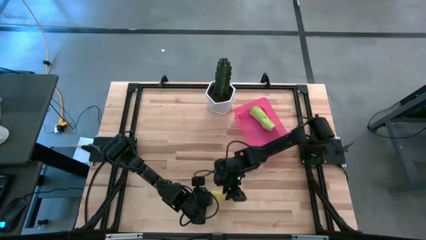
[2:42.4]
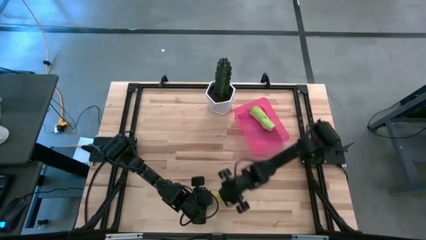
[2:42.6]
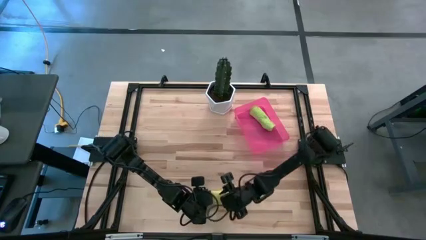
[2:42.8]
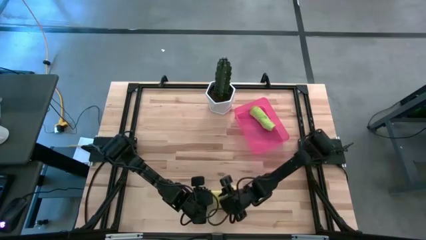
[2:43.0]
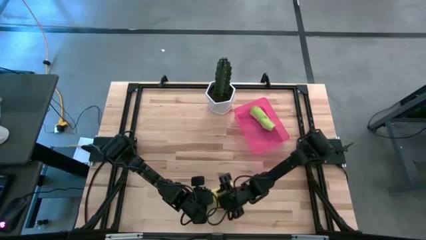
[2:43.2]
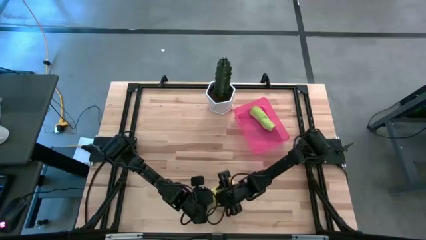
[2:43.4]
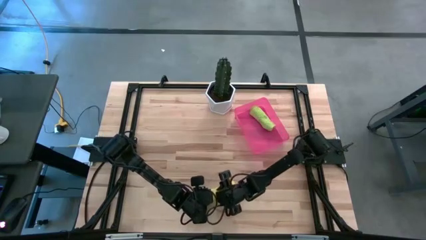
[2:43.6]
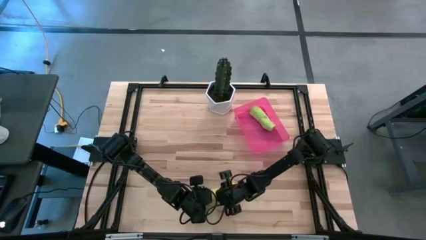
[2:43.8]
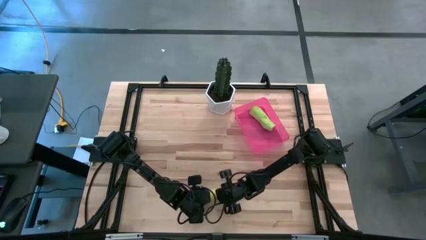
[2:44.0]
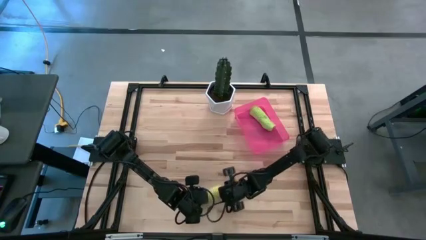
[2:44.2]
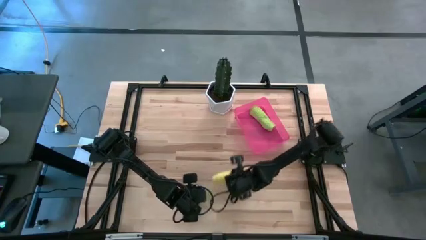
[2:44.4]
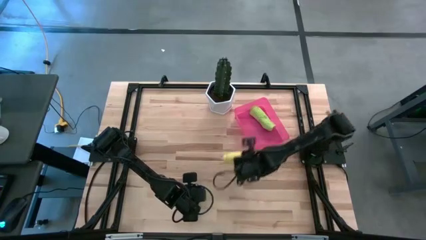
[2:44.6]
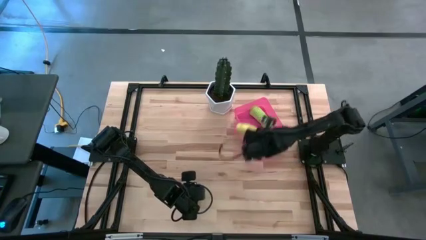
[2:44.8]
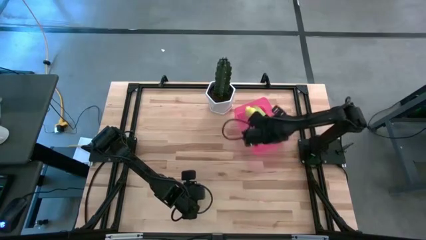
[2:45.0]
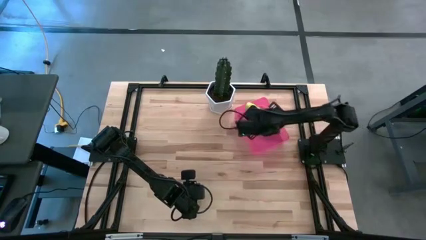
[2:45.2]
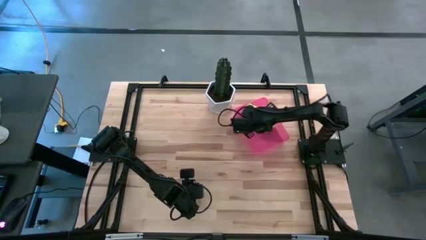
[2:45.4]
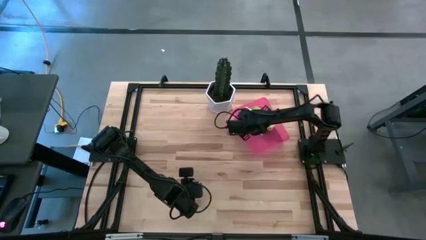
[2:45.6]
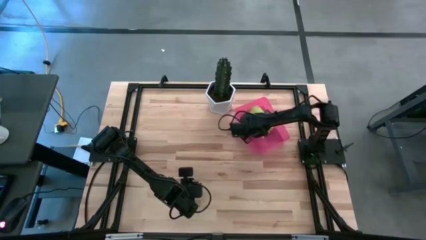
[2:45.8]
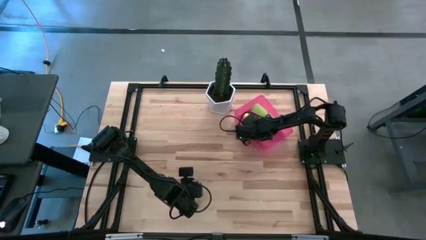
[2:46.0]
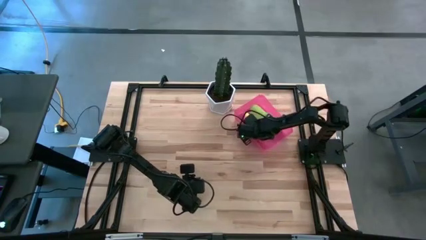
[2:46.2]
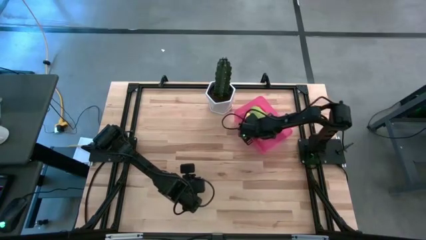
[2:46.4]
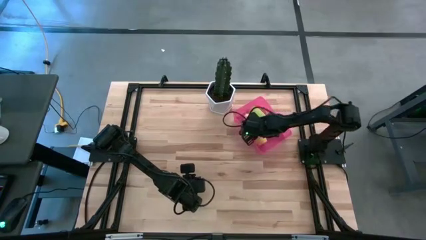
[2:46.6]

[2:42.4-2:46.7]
Task: Roll microfiber towels into tight, uniform cylinder then place into a basket
Put the rolled yellow towel into the pink bin

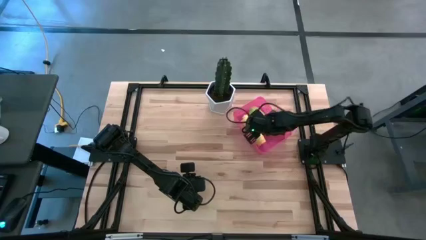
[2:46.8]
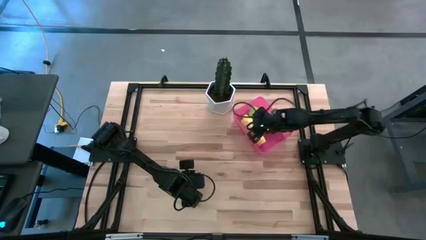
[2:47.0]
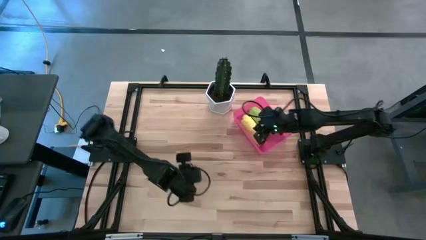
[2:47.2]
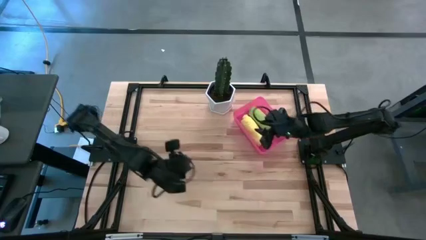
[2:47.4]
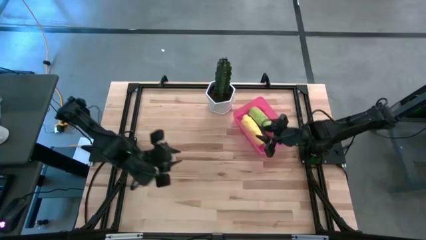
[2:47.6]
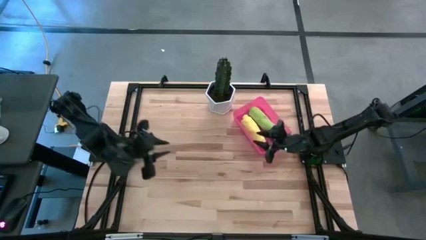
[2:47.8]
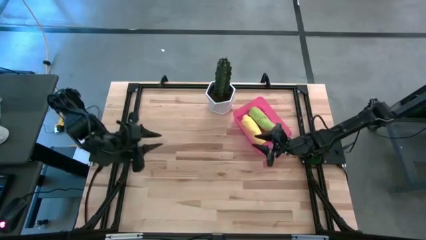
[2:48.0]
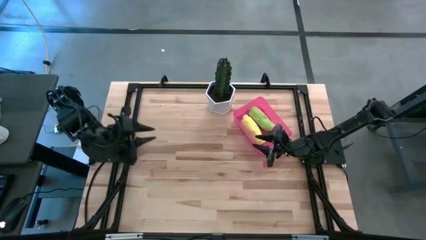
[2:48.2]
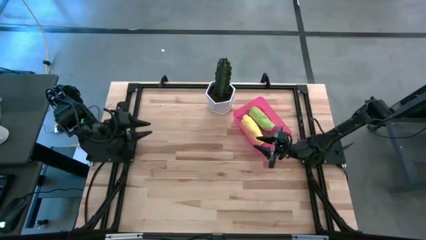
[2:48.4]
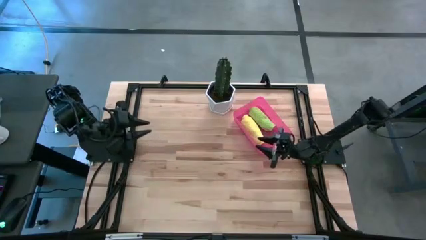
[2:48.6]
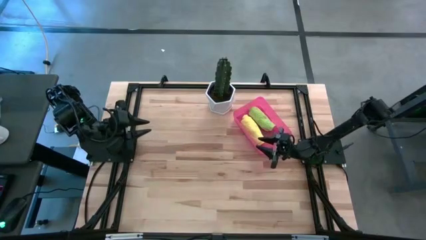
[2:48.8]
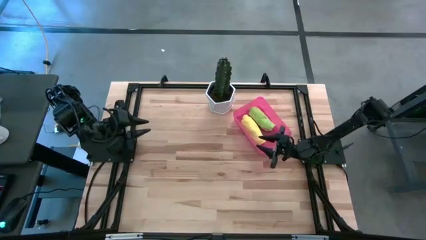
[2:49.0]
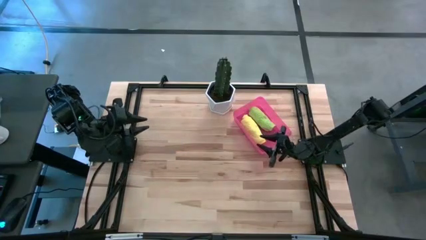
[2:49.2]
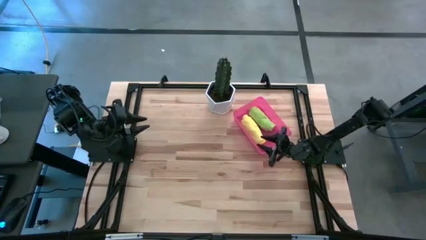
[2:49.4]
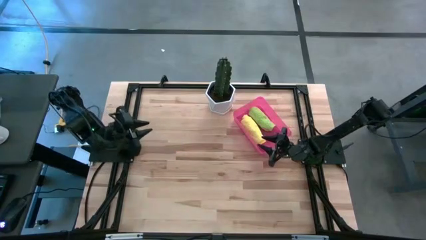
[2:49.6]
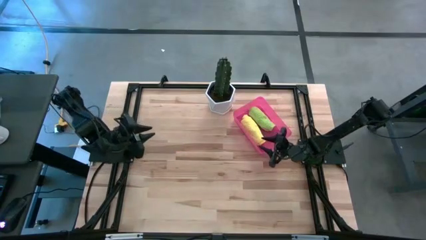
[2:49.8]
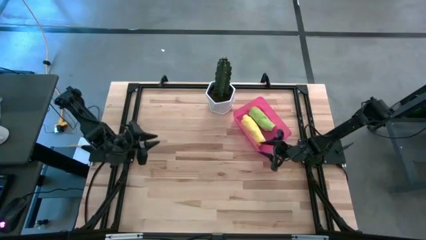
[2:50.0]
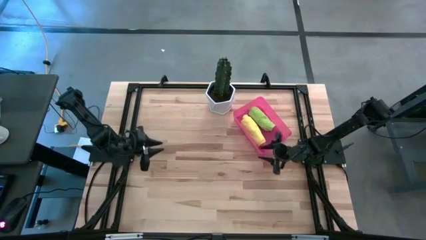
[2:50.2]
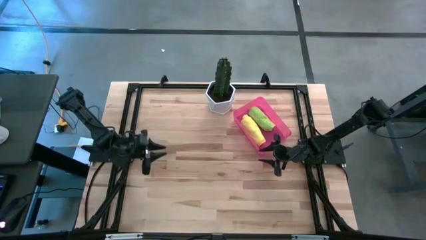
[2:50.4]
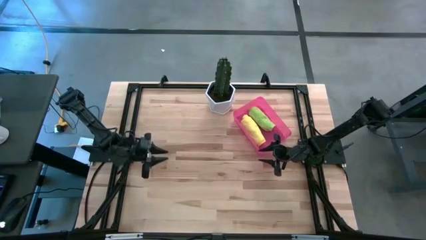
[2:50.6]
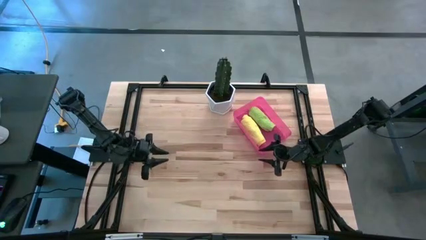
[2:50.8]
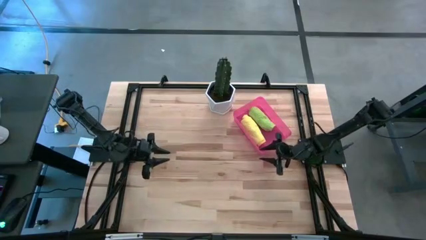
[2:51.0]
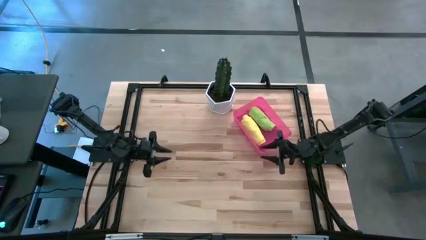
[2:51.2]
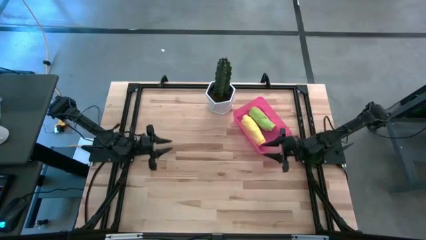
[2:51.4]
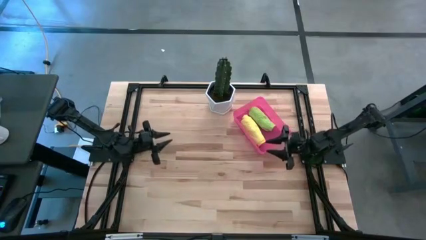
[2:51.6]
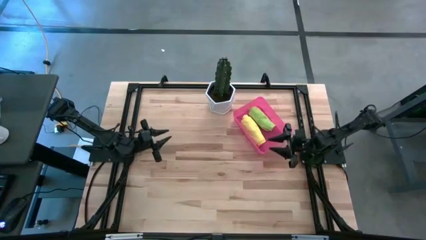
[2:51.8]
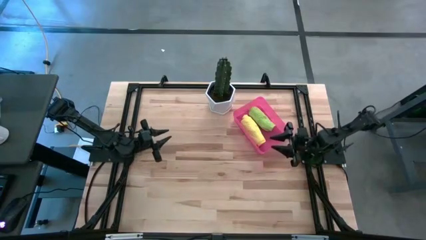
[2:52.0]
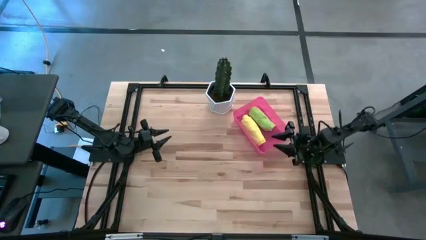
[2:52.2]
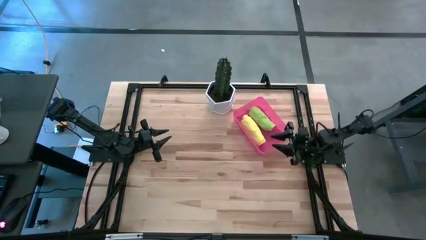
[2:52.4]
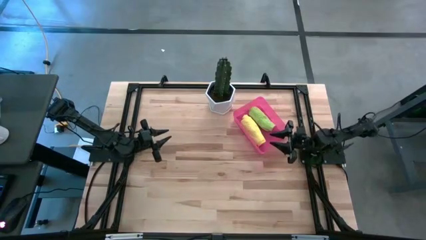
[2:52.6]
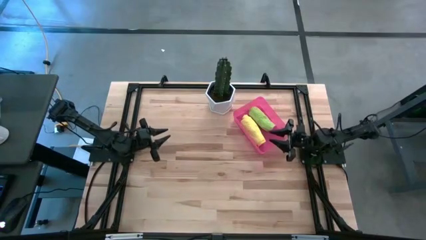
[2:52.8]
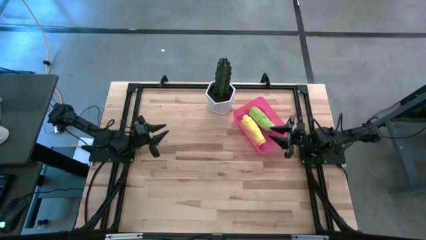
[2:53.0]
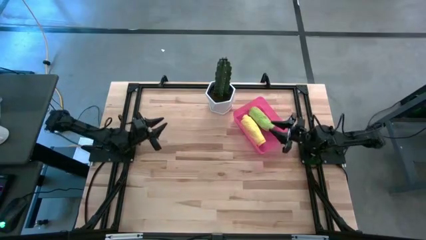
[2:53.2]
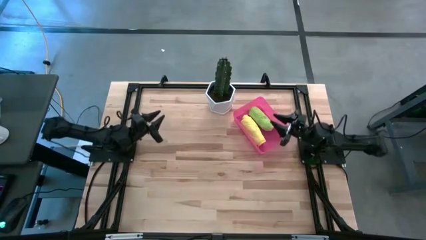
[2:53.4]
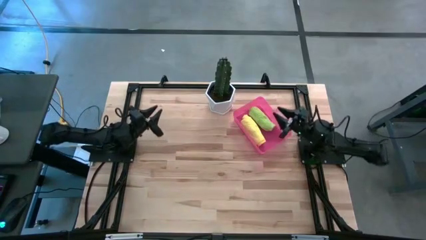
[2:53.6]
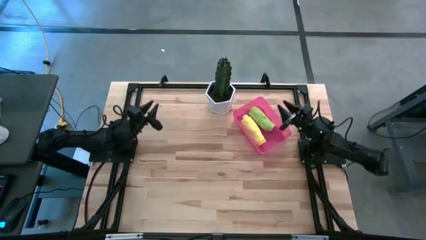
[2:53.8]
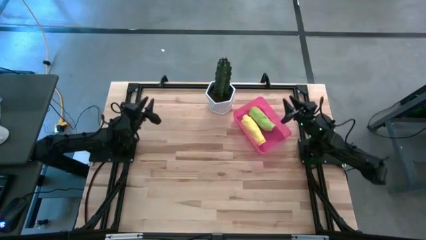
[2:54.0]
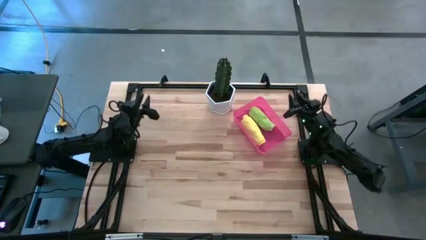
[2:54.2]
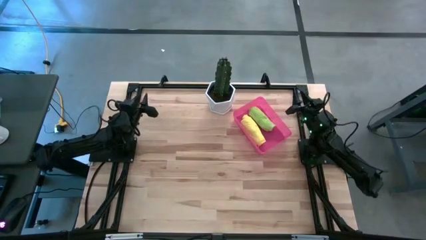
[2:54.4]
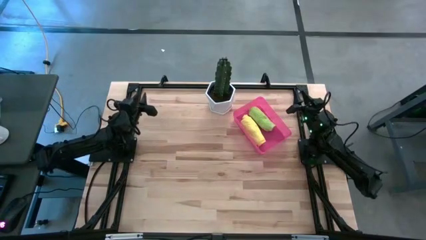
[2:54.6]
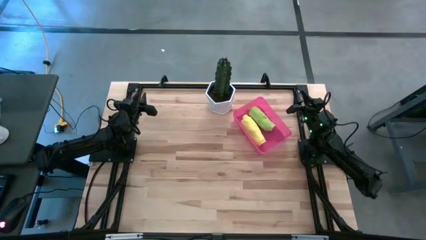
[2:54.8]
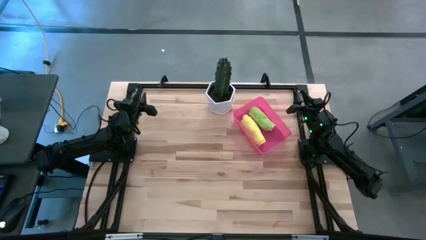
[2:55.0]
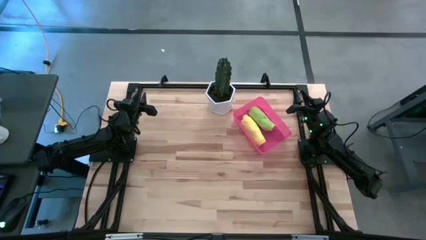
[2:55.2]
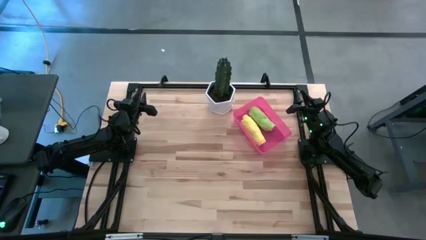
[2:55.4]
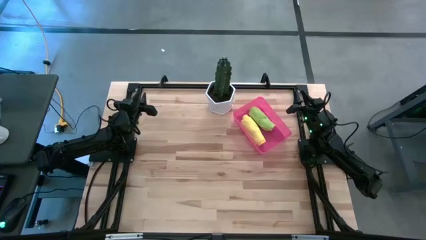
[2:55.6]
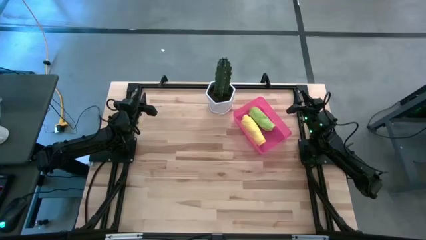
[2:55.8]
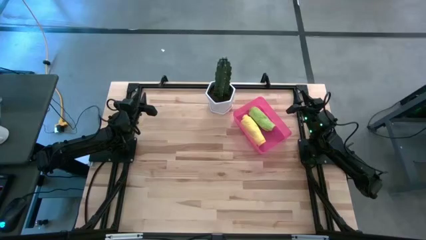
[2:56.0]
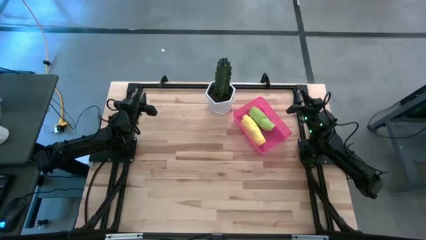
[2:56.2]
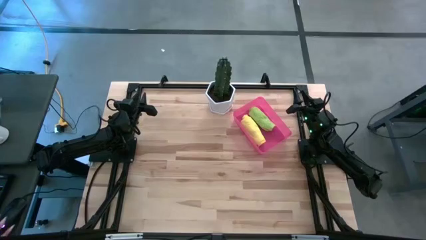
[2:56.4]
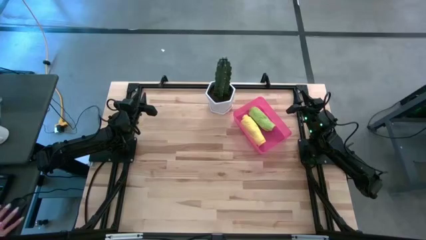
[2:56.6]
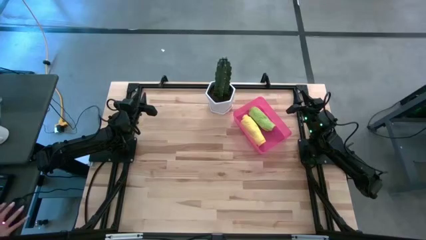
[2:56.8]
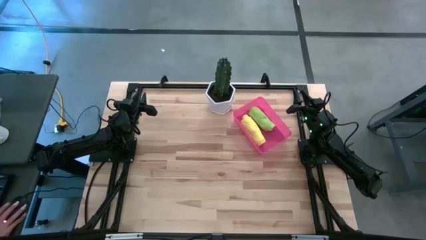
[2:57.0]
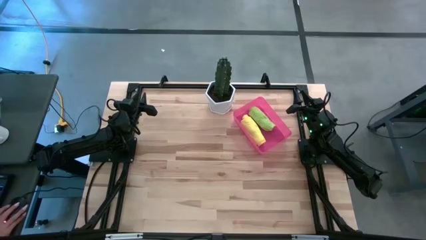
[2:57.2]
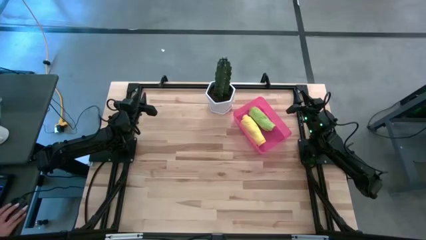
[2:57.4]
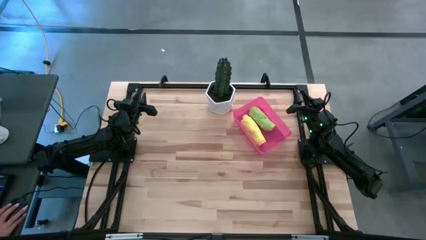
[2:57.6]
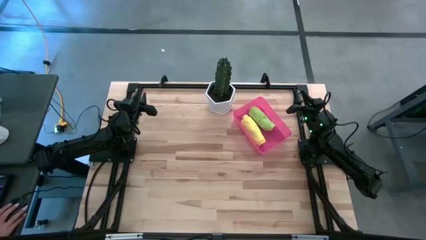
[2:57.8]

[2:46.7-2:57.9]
Return to Home Position
